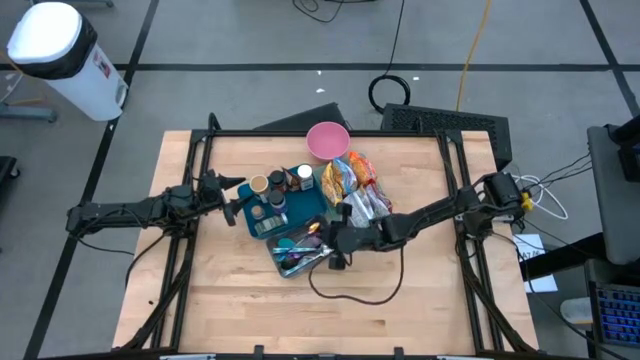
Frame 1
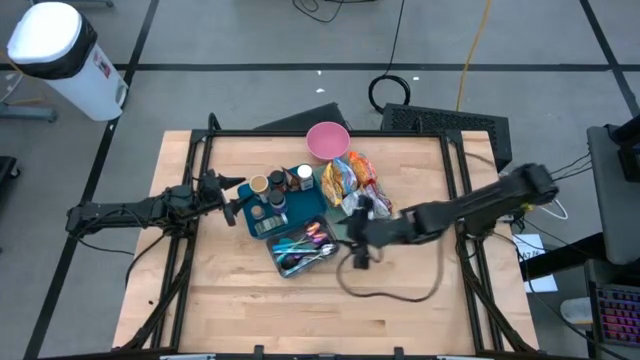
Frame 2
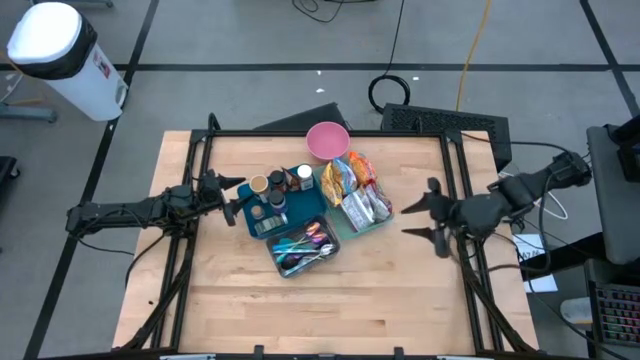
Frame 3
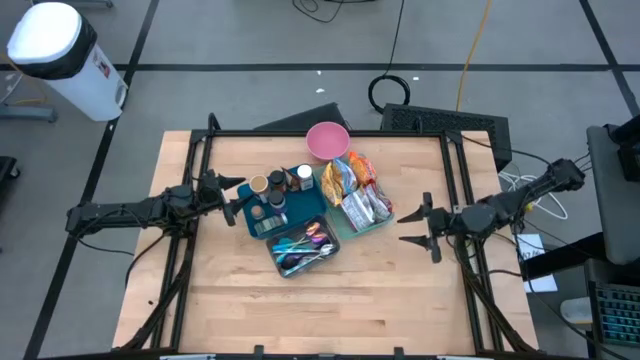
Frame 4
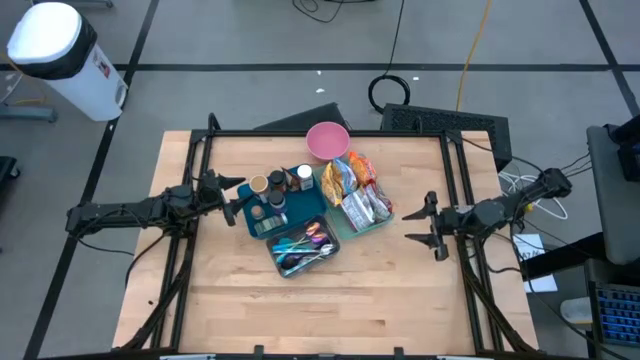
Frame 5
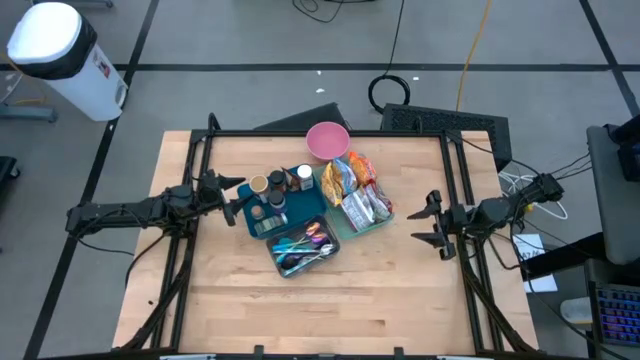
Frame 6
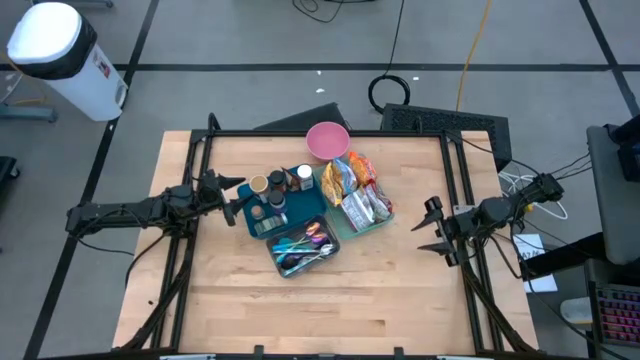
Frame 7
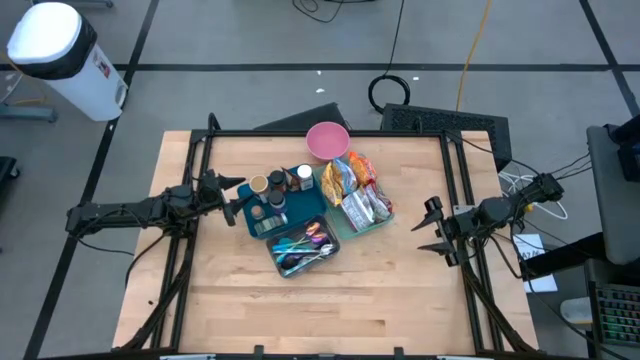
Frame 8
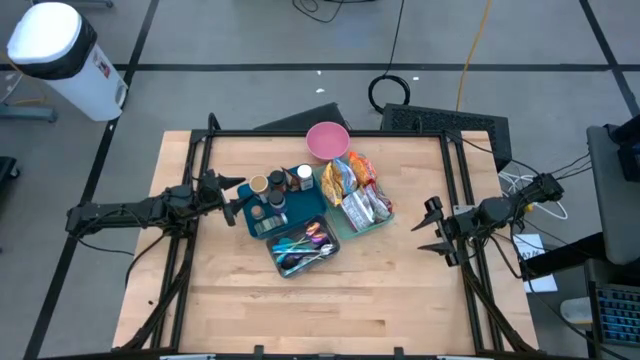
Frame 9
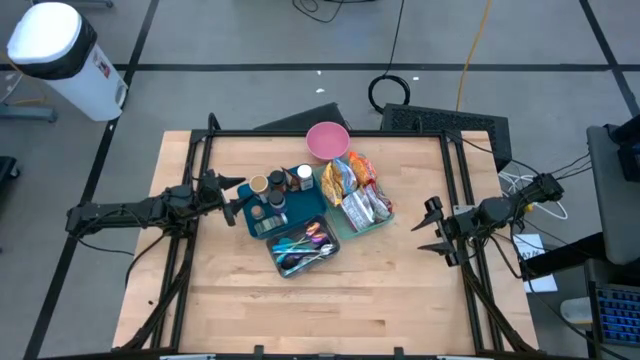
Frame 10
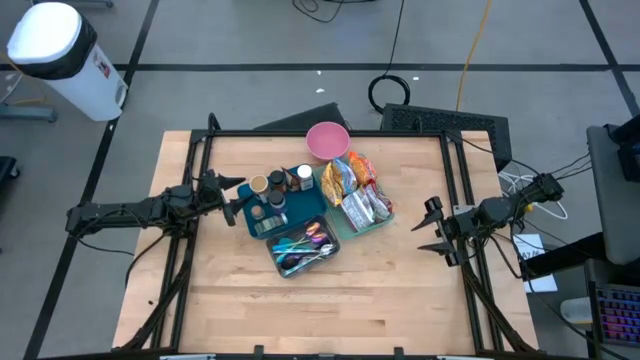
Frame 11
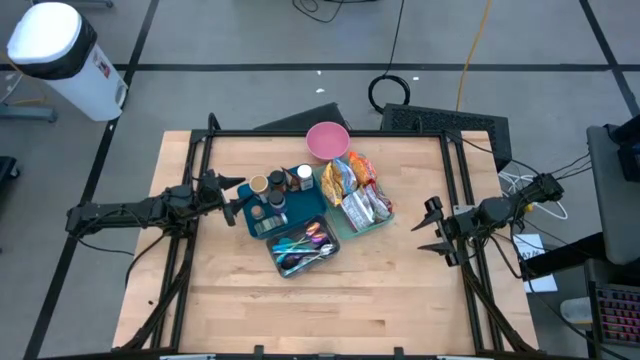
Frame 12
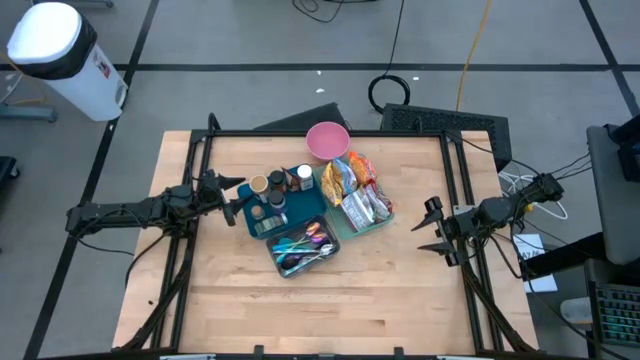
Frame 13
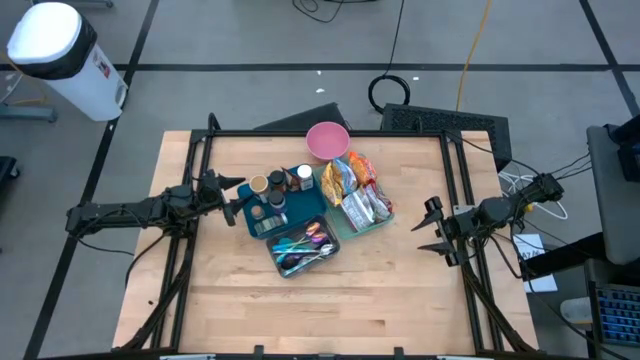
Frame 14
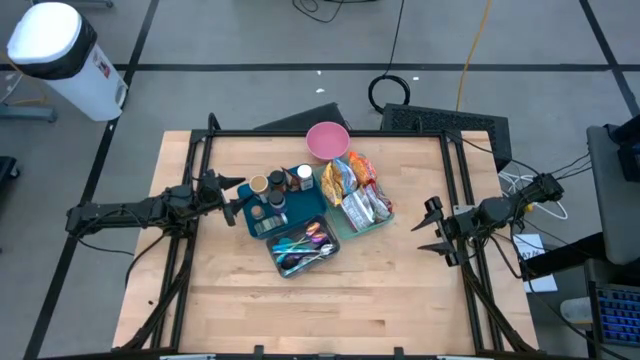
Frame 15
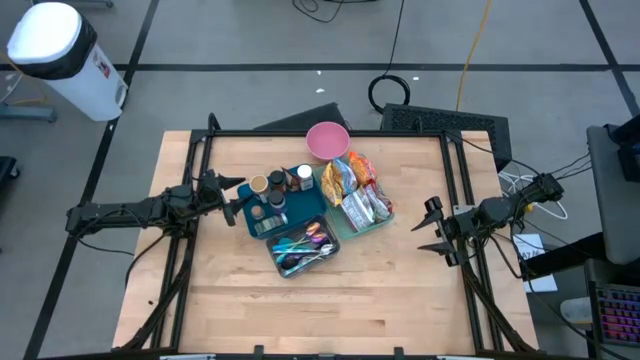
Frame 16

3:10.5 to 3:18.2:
Task: Pick & Place Food Item
Return to Home Position

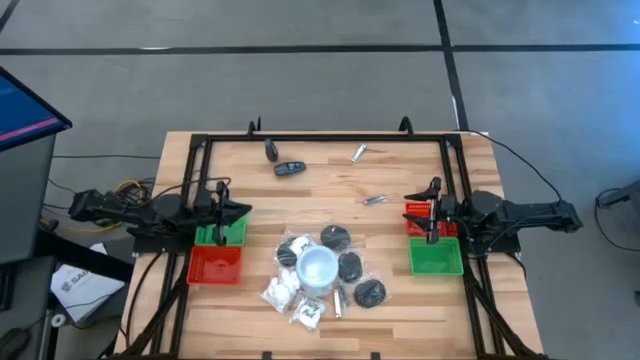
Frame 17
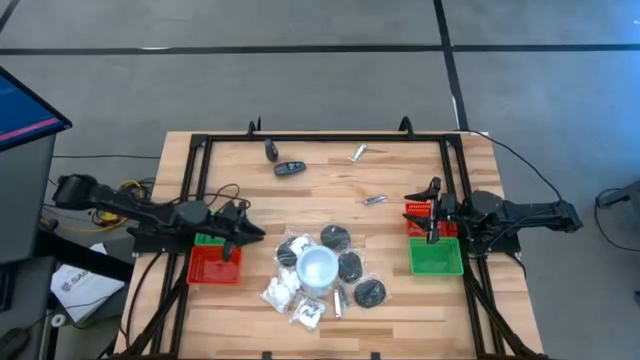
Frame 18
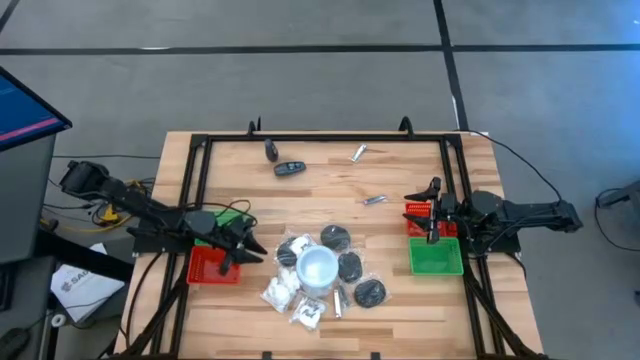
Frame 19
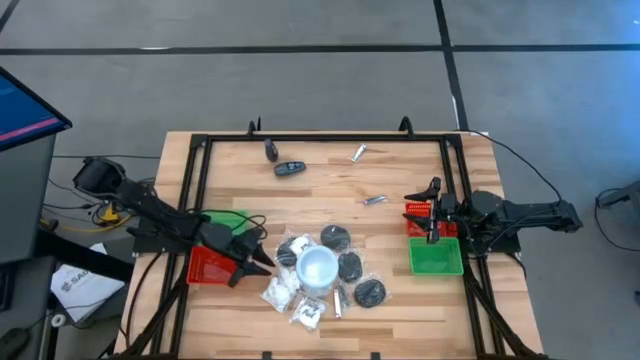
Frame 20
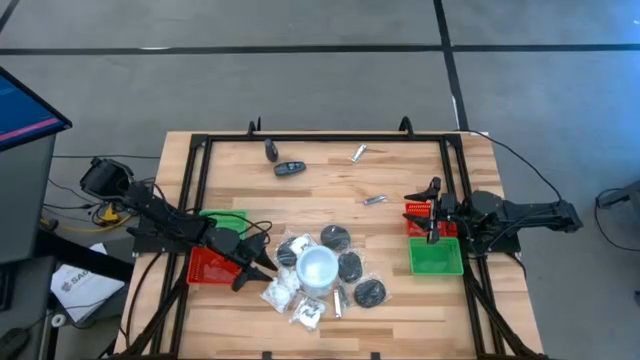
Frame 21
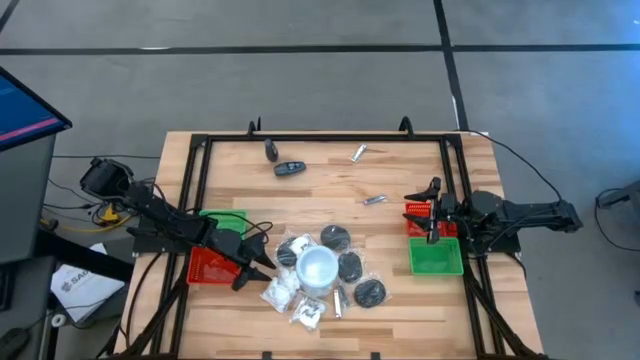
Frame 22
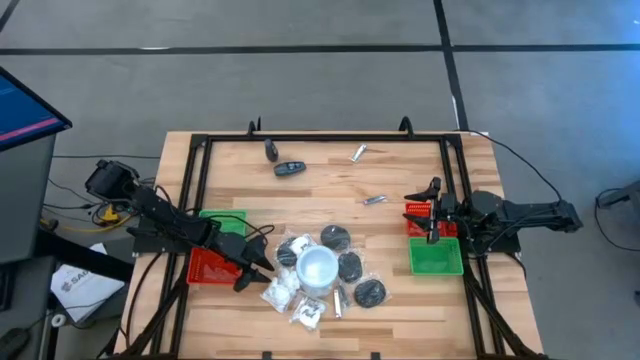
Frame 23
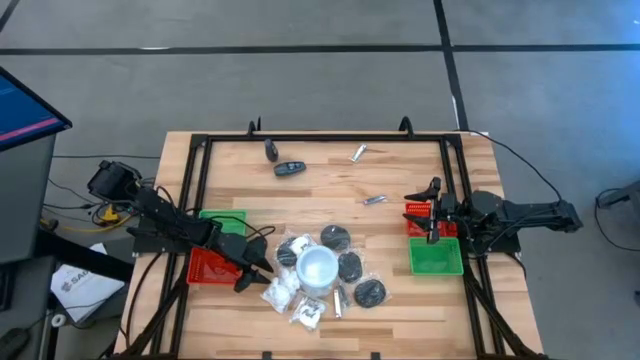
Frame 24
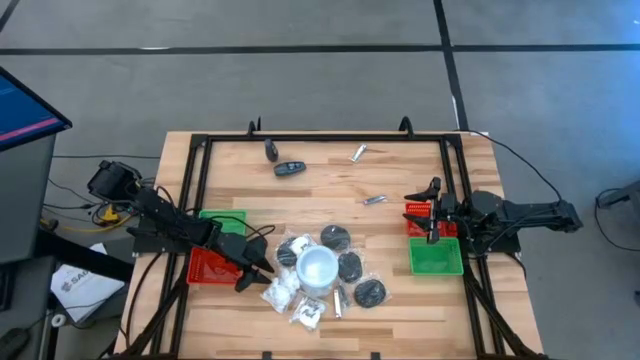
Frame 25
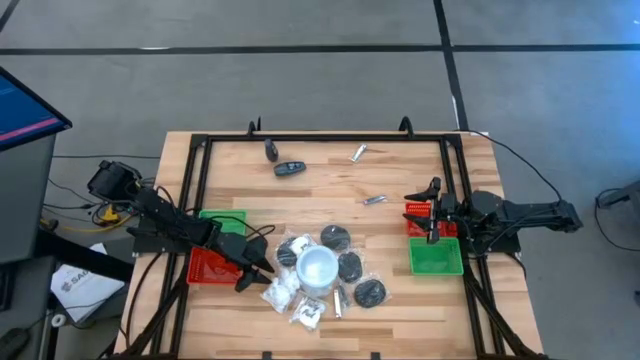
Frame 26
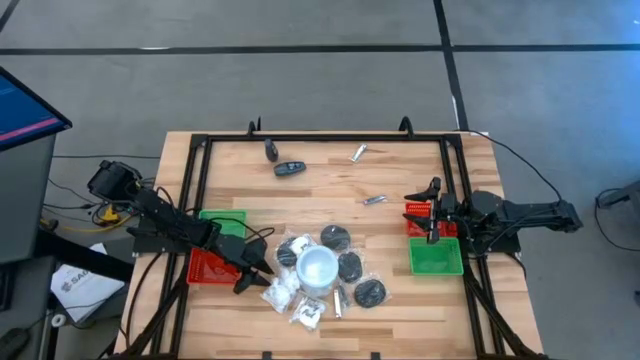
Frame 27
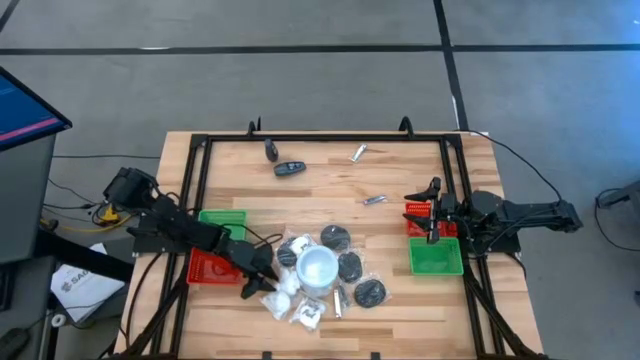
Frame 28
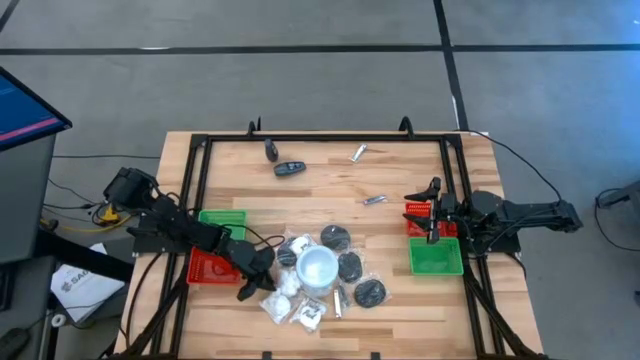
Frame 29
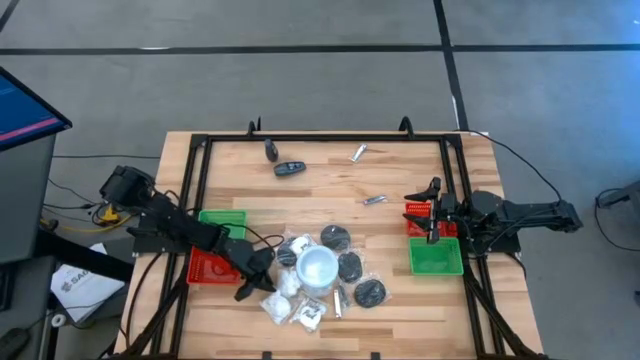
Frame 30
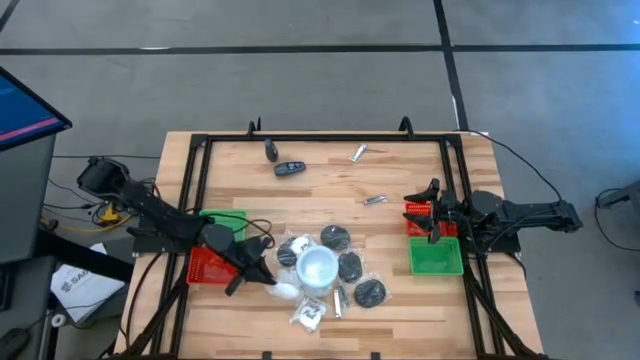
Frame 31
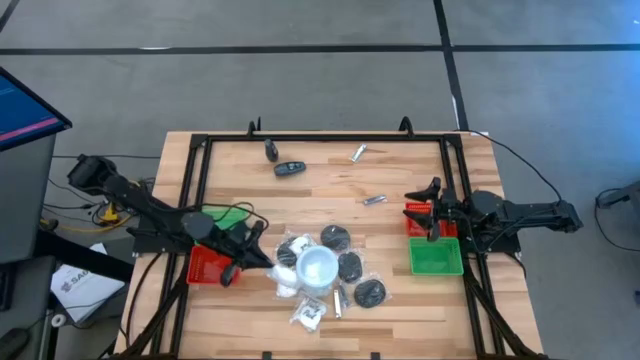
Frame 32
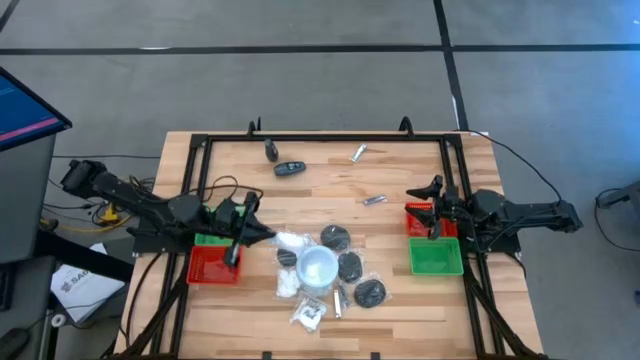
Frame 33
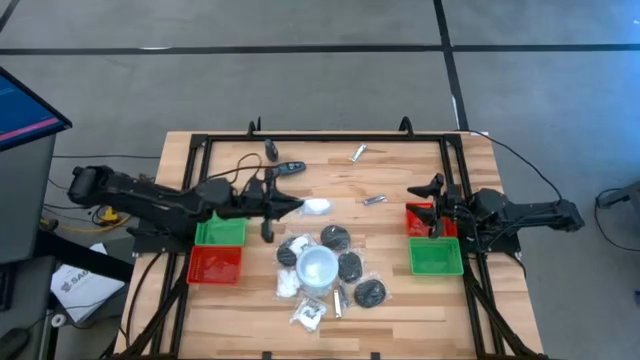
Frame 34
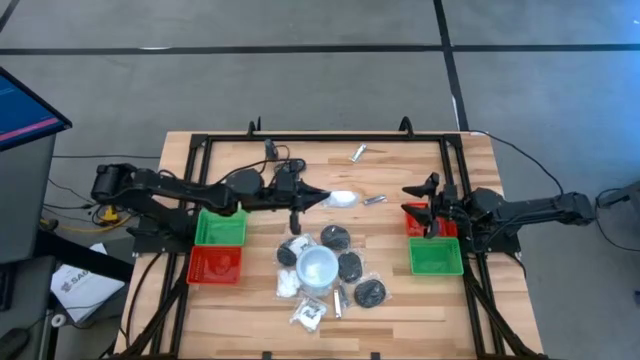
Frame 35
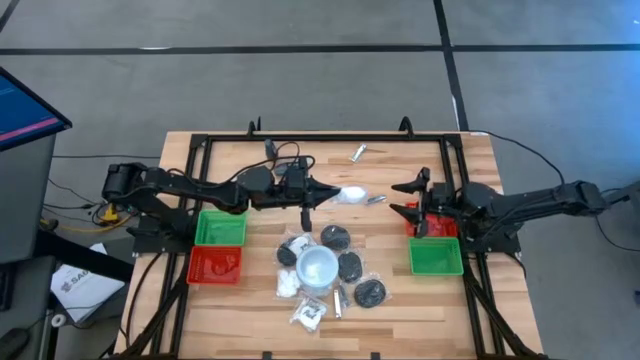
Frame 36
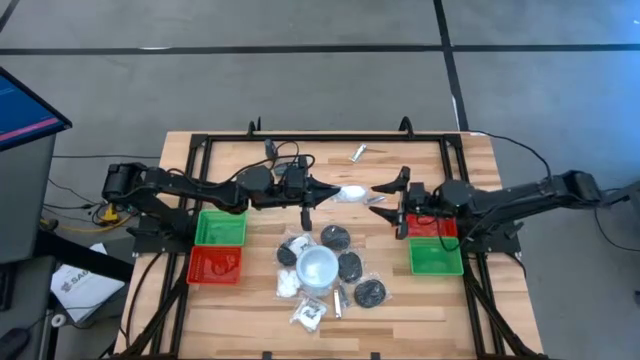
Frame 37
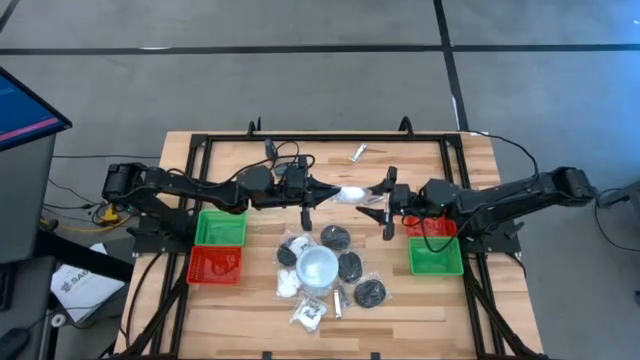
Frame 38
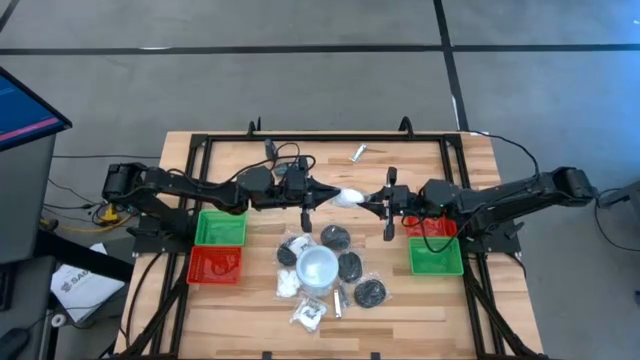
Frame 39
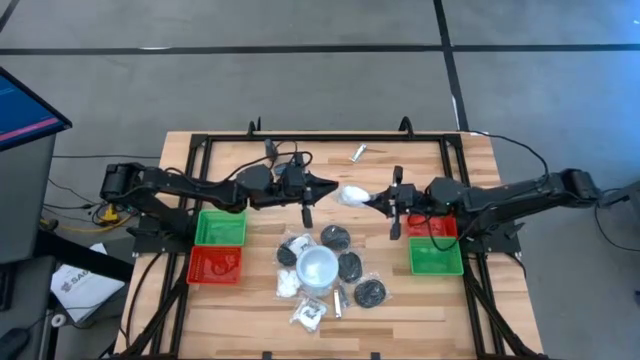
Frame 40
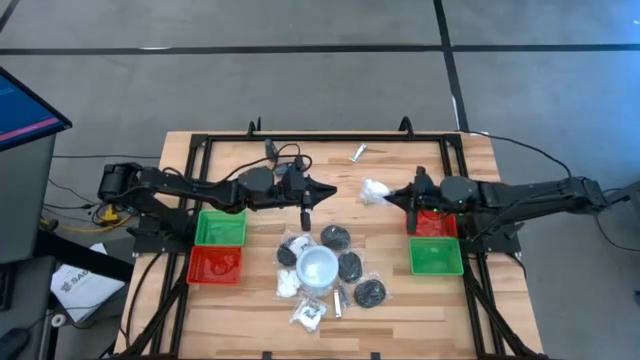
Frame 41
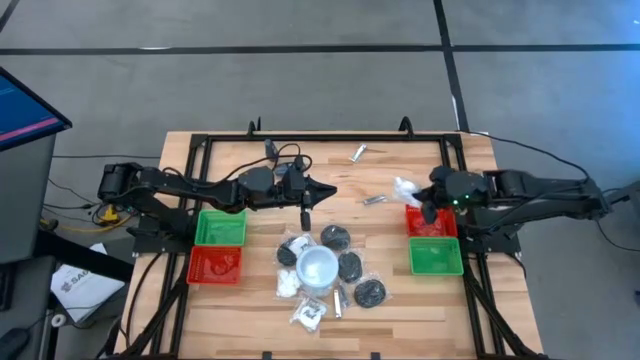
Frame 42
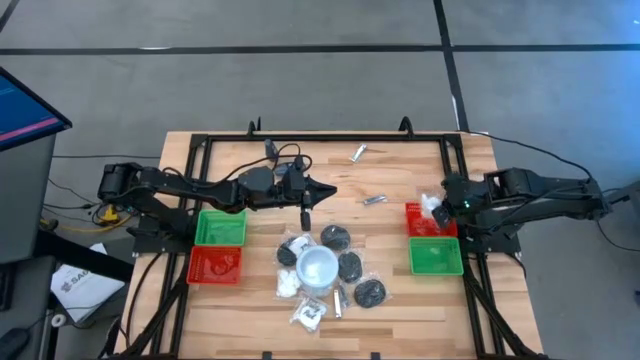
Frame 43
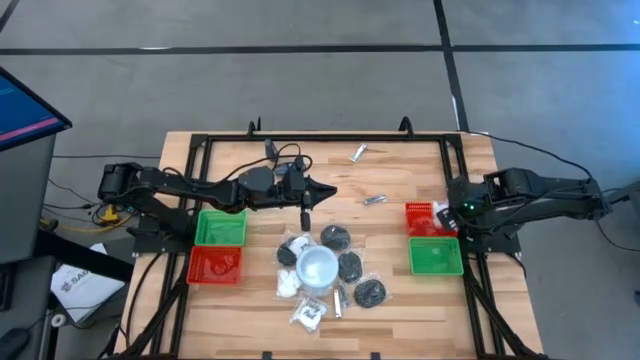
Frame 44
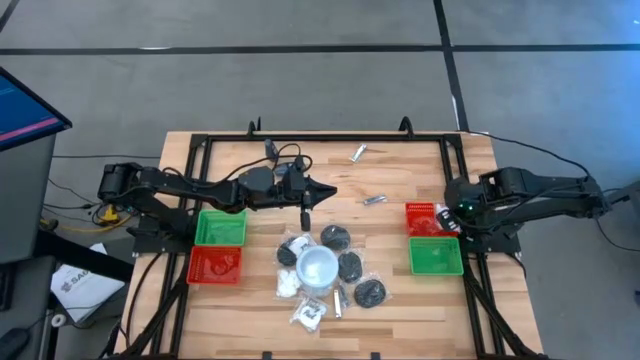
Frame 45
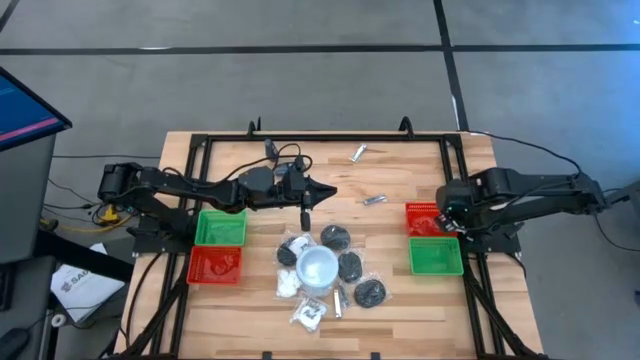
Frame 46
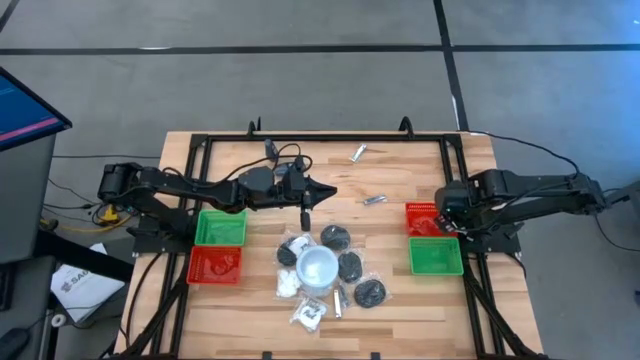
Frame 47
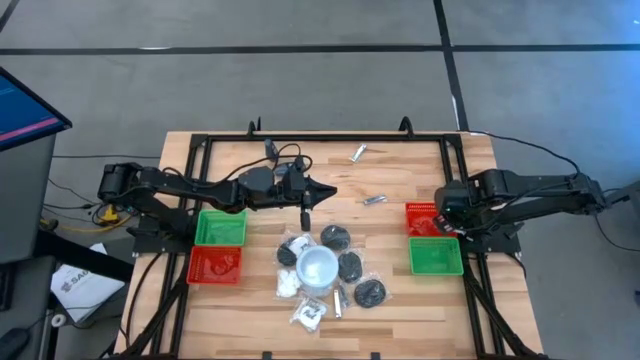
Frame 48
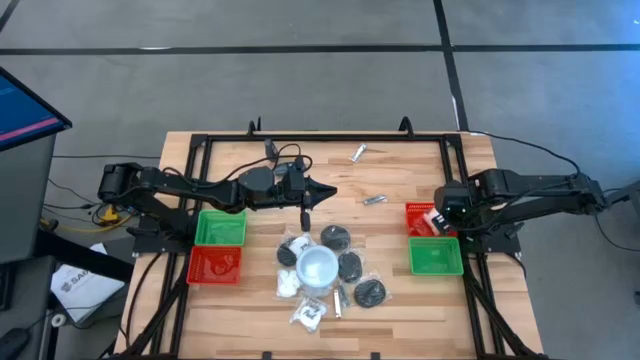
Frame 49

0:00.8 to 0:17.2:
Task: Pick & Place Travel size toiletries
Put the white vanity pack into the right red bin
